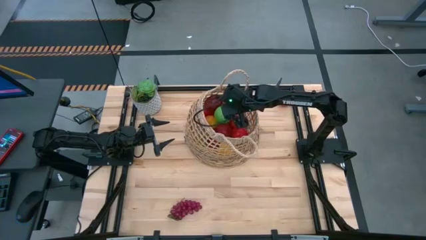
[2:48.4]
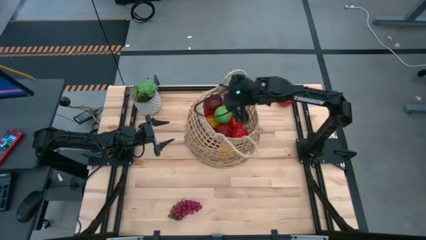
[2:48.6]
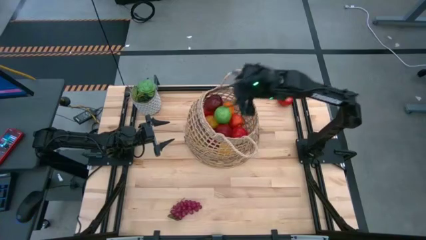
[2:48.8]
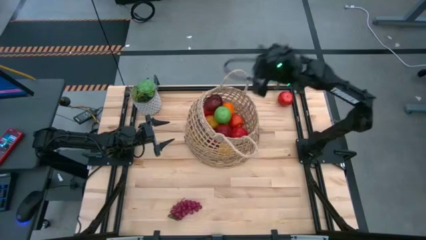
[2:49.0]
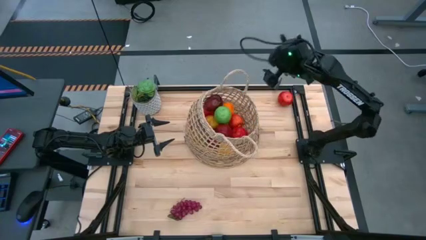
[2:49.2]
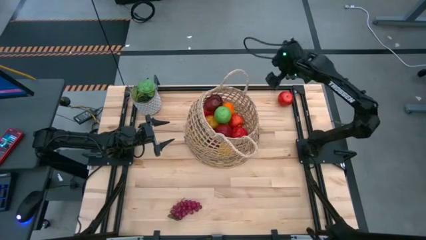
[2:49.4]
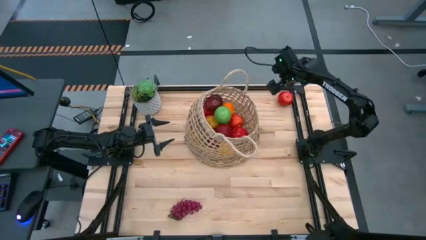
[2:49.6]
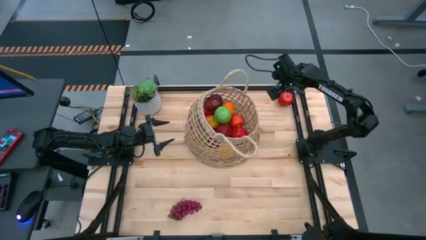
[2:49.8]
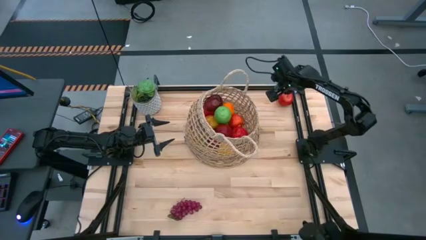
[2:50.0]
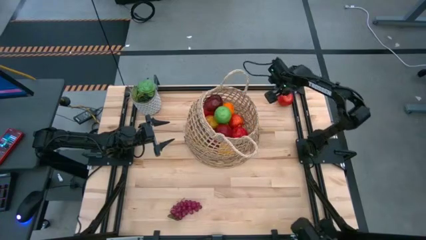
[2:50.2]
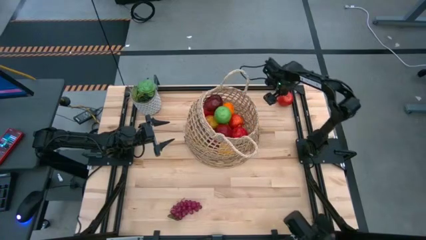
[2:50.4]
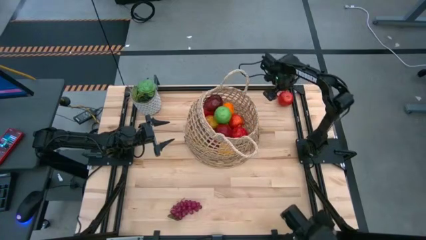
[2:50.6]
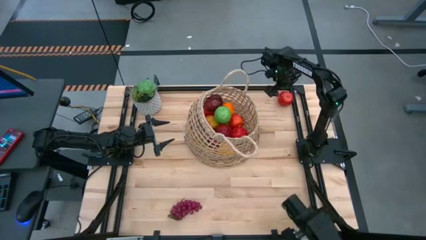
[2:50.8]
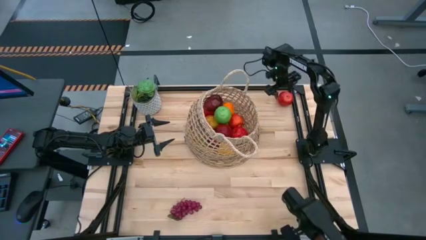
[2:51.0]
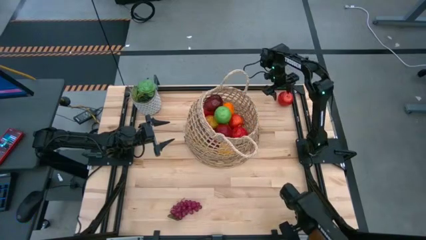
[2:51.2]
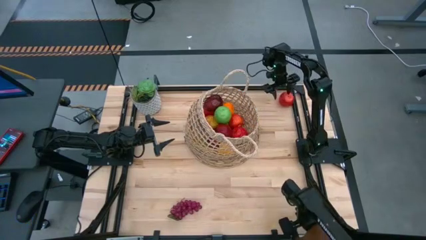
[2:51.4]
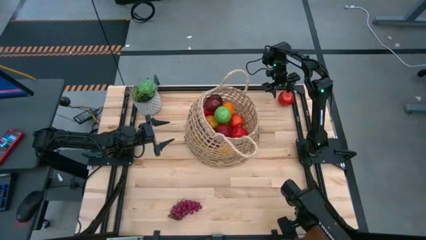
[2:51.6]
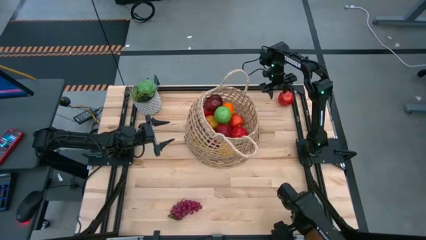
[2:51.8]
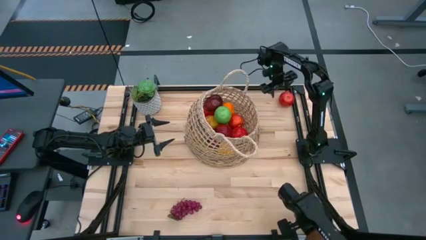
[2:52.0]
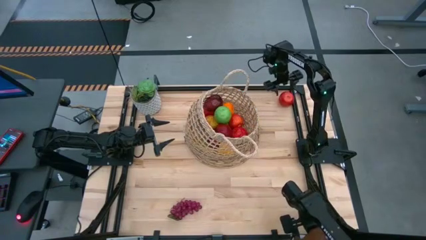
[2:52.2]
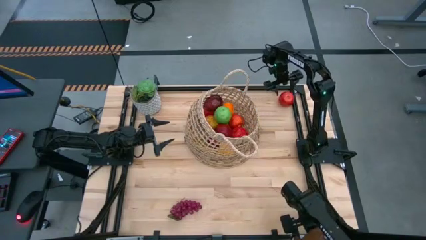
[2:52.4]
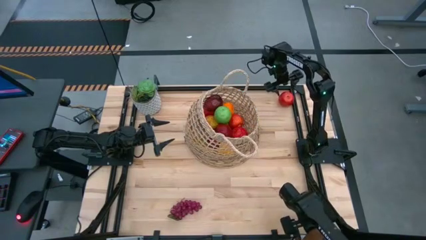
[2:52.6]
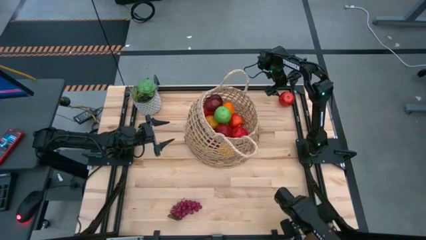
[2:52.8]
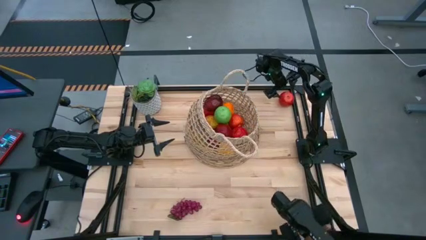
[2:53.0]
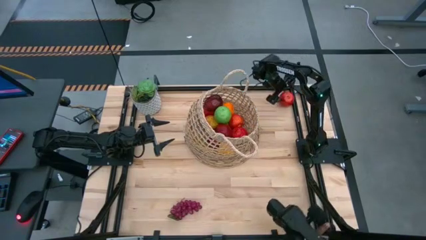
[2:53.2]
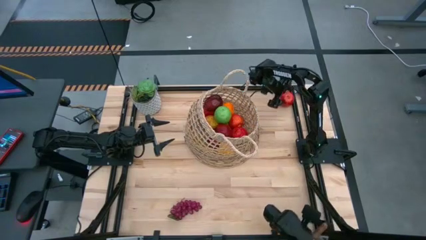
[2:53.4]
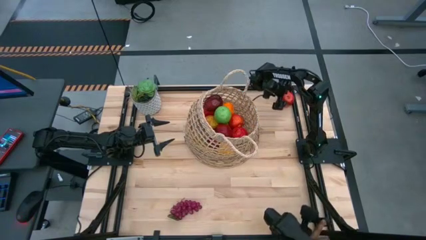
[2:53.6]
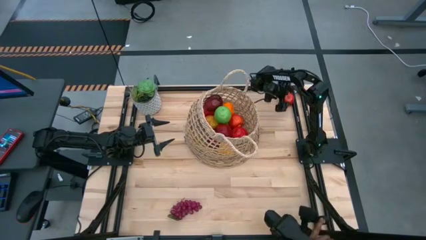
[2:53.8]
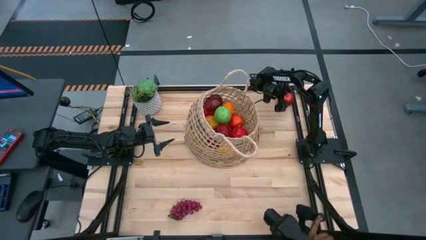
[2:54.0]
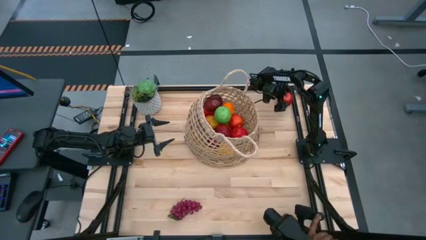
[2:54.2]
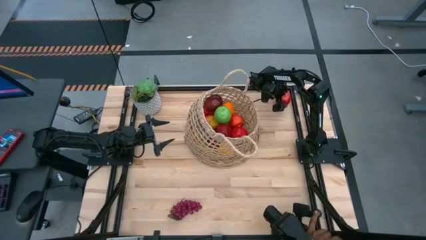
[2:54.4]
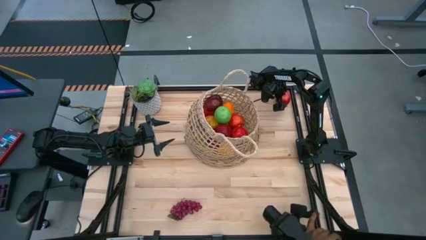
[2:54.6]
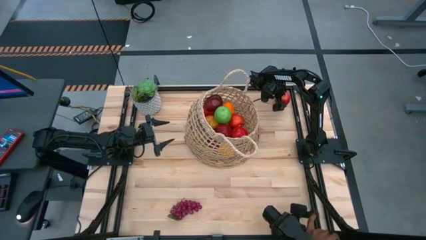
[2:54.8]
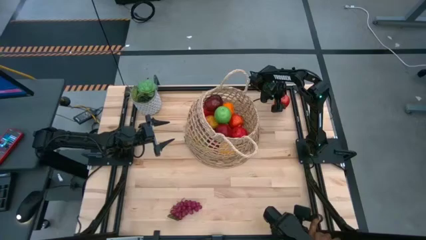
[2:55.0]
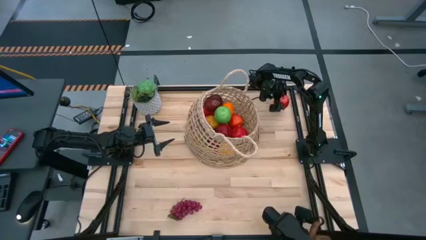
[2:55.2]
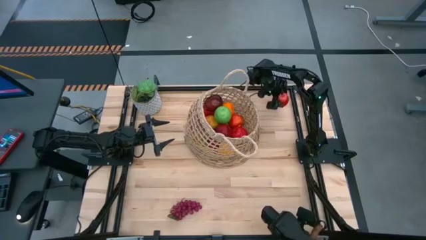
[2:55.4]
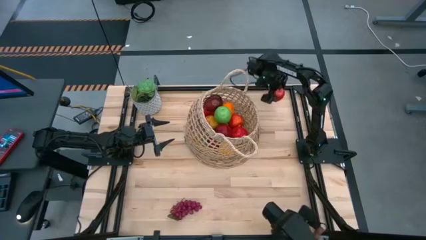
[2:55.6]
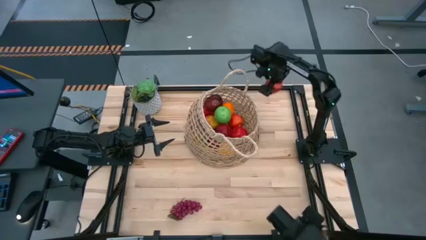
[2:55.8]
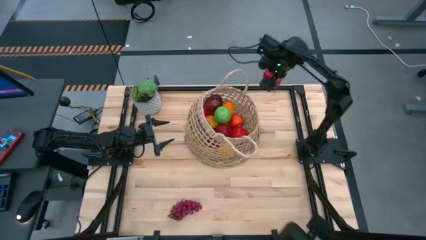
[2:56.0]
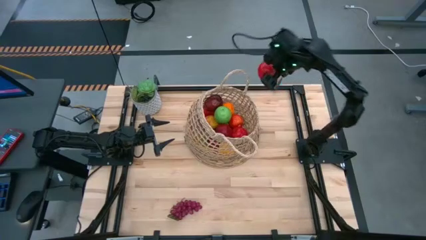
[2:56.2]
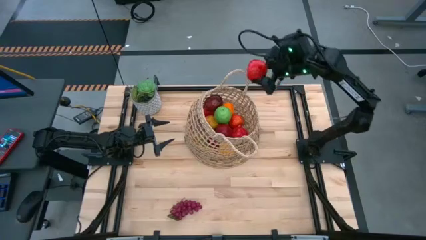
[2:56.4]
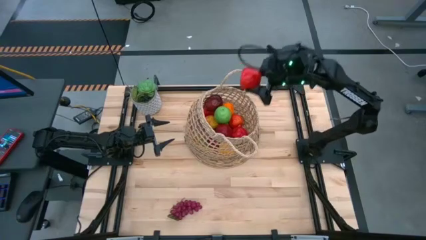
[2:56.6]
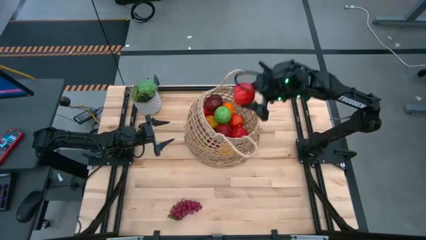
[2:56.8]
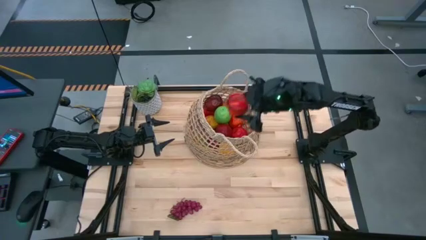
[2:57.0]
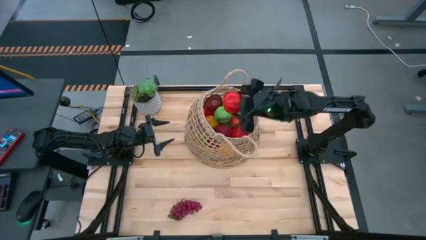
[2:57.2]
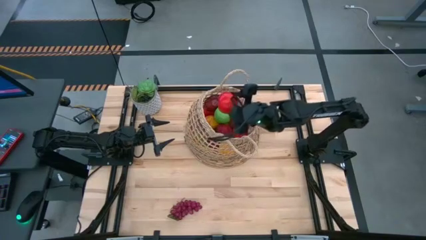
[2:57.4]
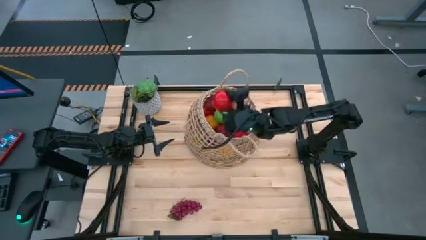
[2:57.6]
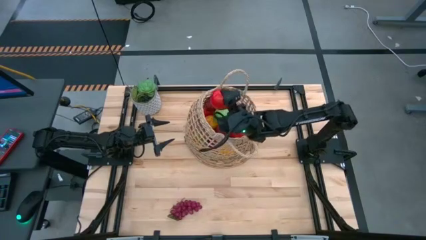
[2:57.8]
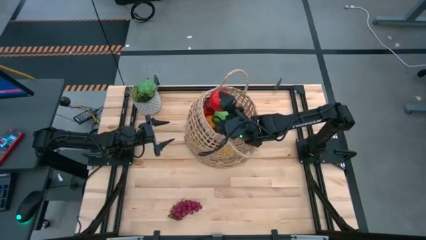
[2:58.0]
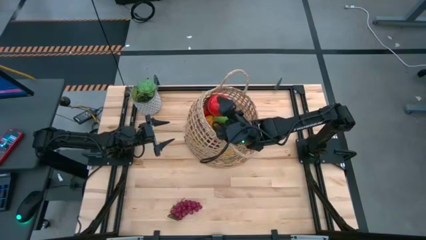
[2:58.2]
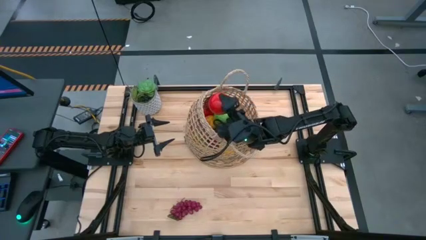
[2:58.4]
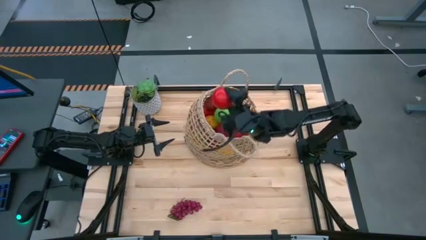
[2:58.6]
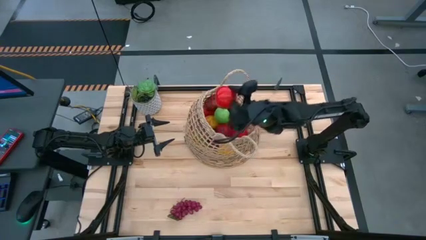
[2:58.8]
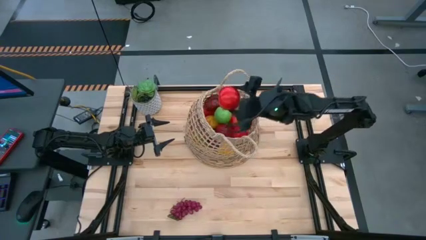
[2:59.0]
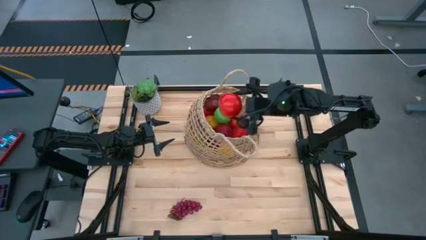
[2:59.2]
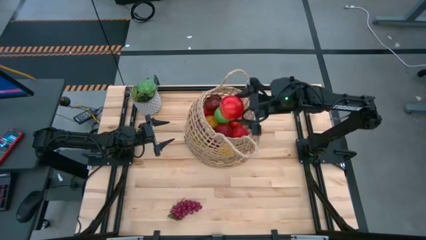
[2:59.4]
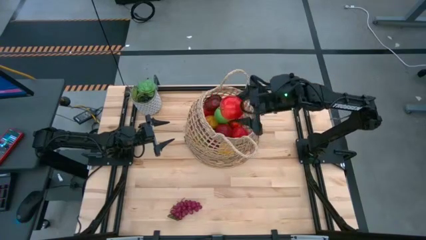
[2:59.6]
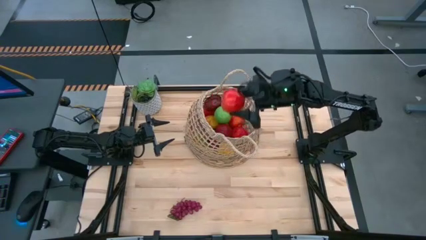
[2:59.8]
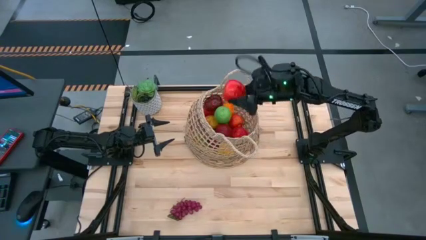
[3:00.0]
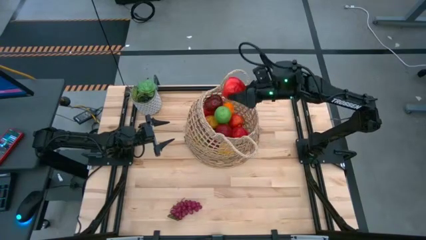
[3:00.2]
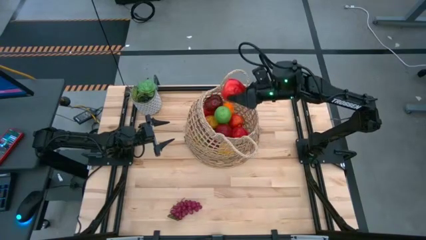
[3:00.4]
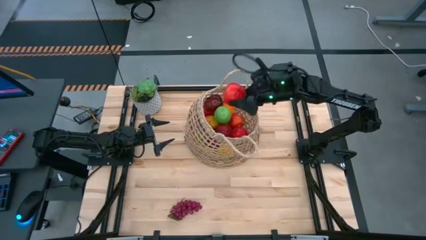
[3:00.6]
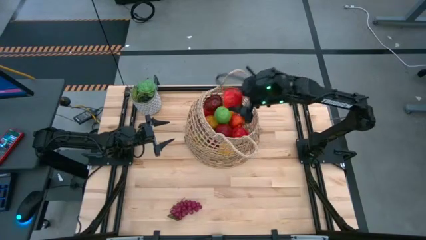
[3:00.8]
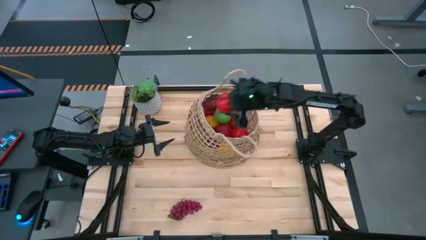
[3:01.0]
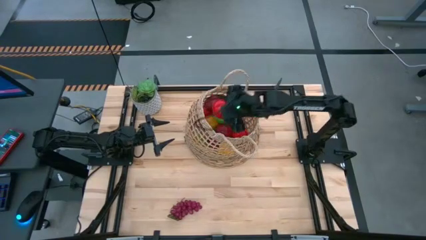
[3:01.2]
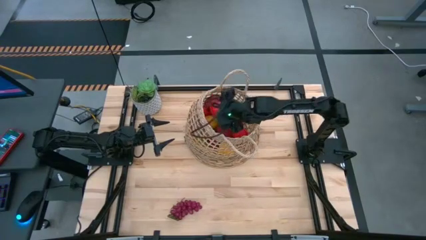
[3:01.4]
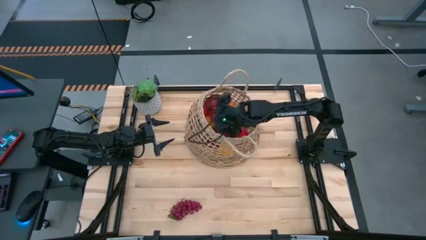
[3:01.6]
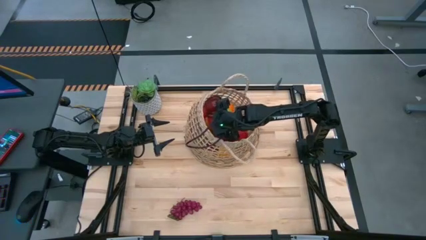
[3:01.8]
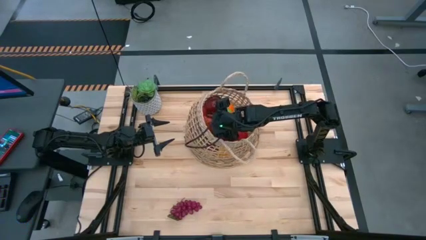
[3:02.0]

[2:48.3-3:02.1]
Task: Build produce basket
Put the red apple into the brown basket
